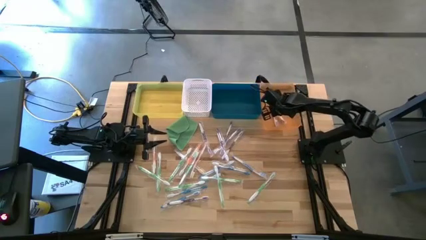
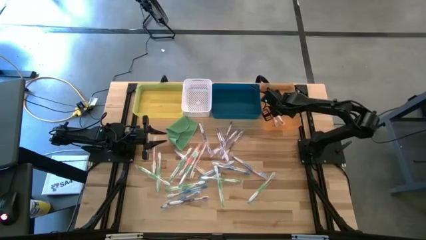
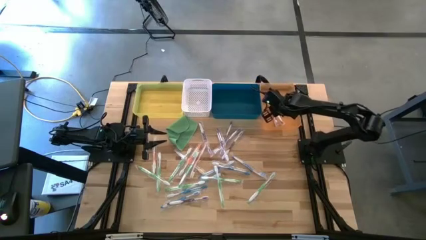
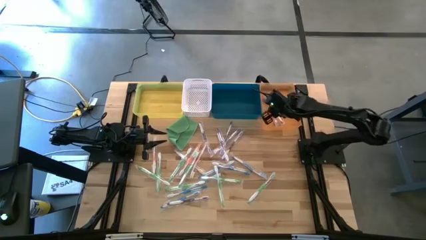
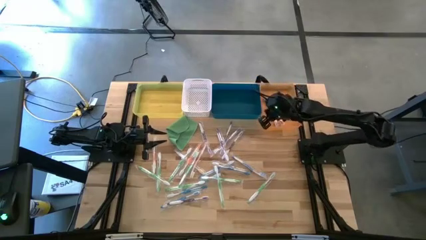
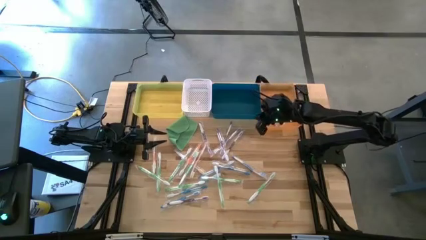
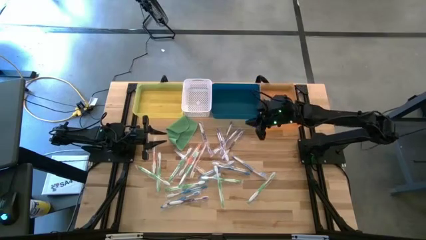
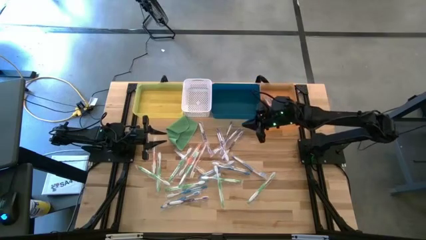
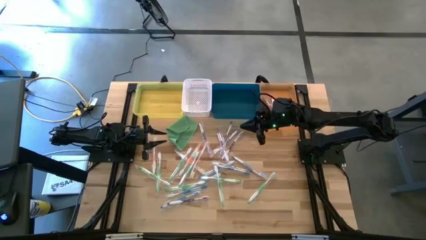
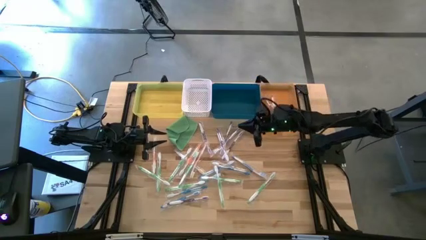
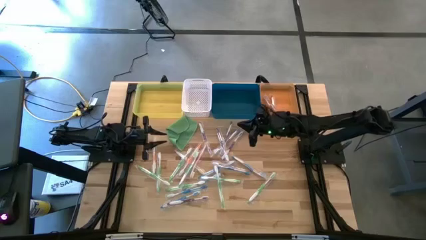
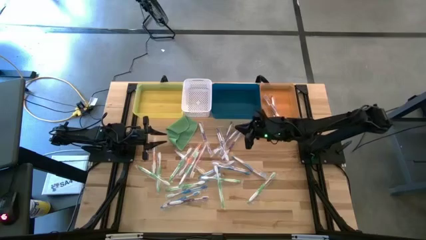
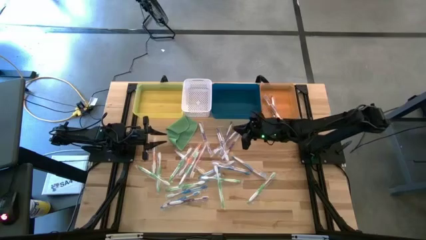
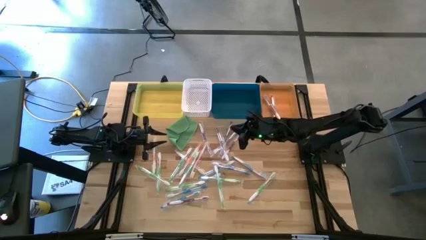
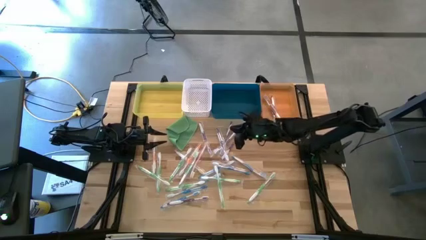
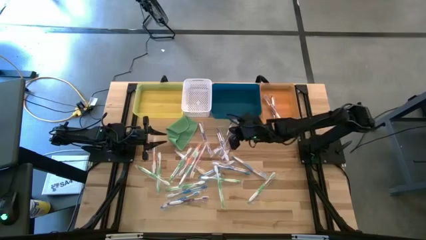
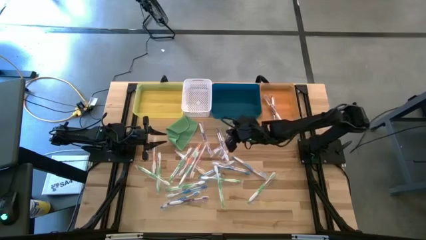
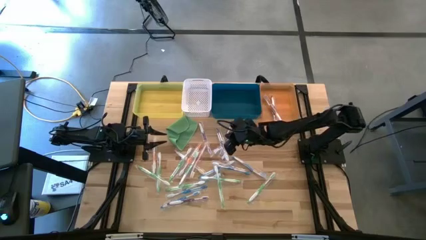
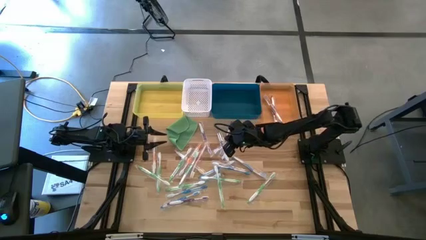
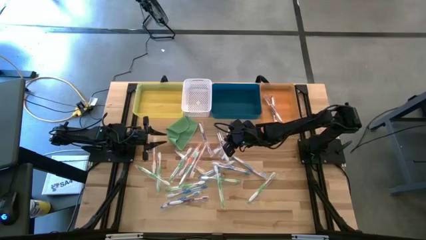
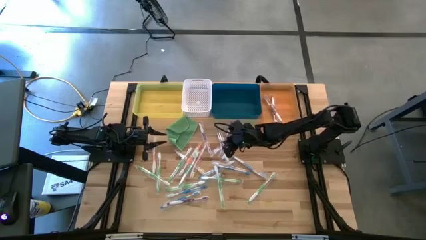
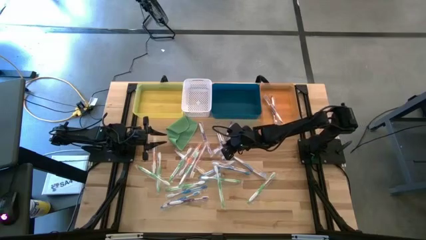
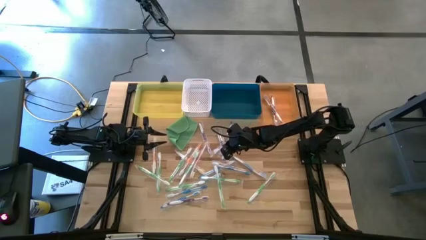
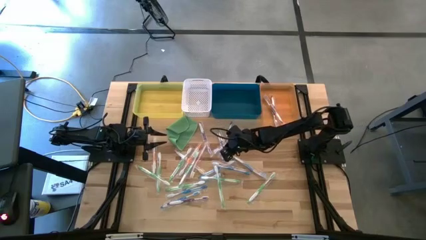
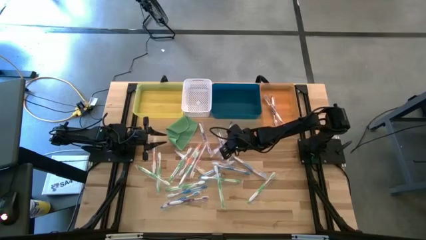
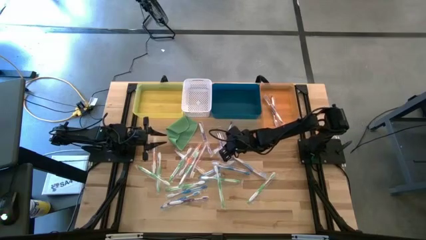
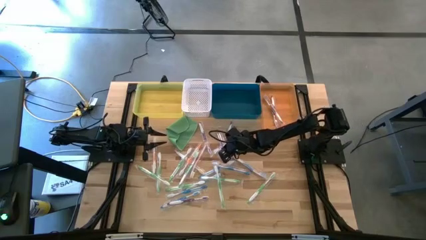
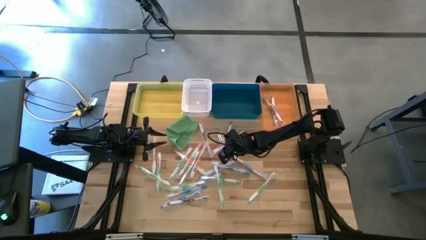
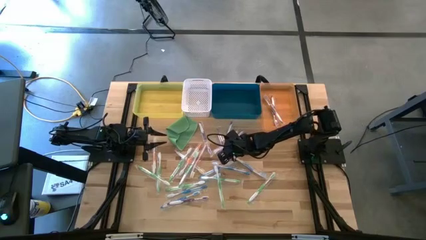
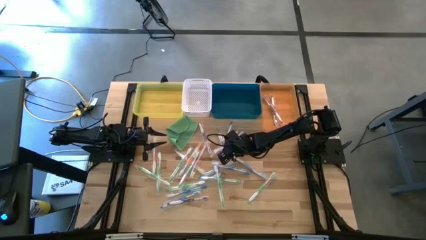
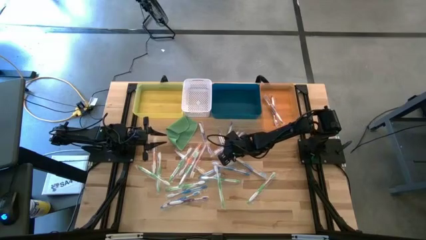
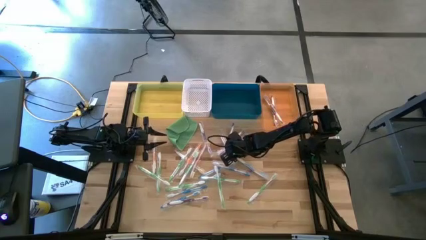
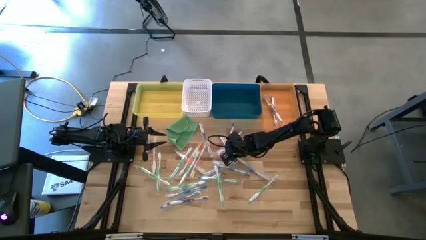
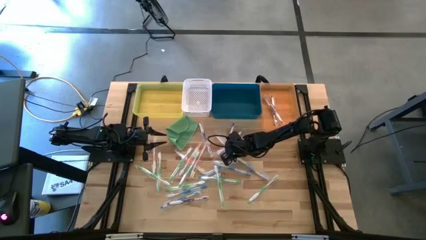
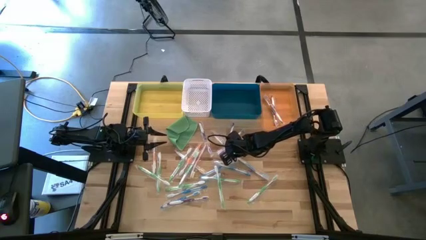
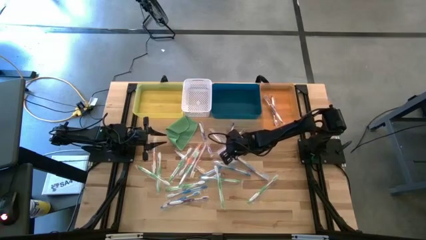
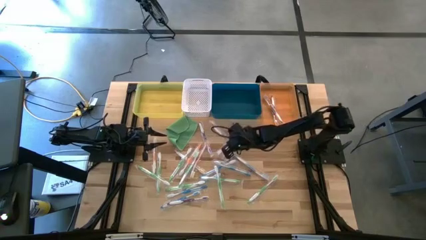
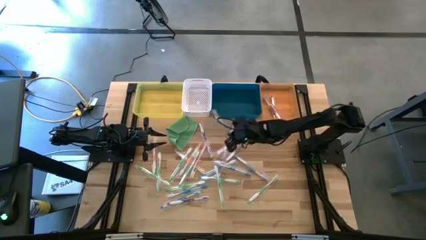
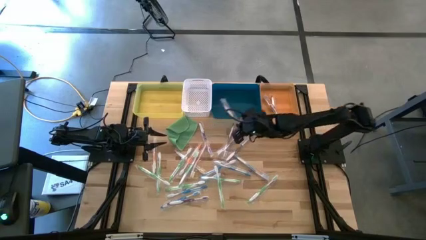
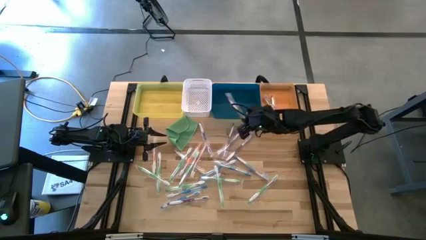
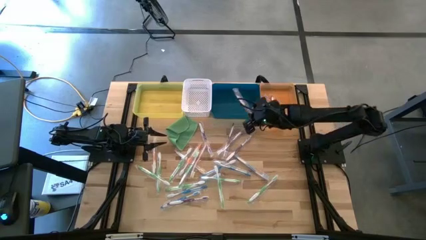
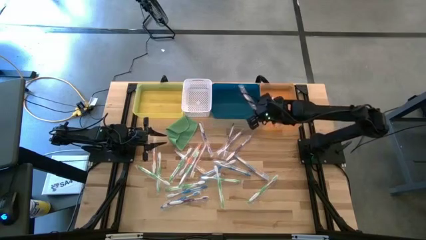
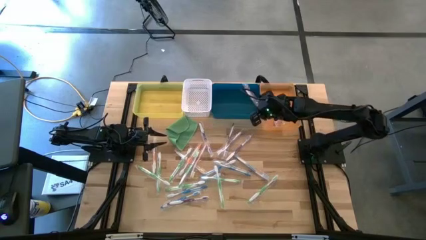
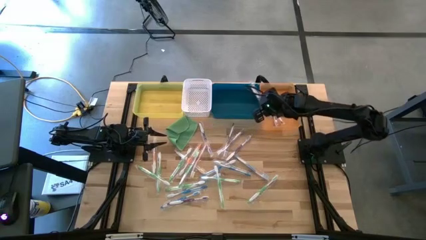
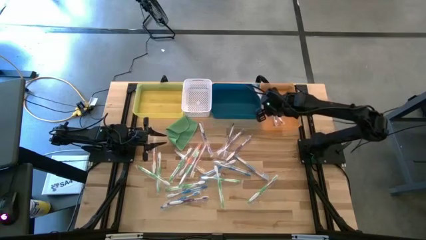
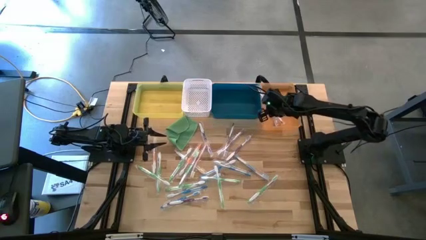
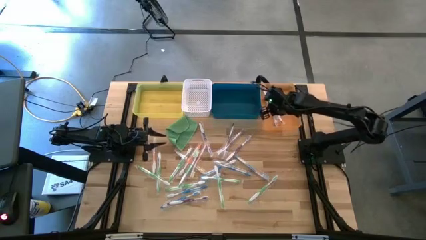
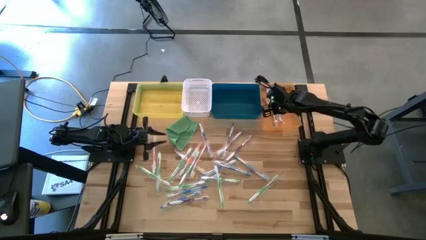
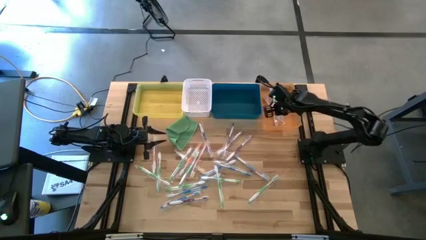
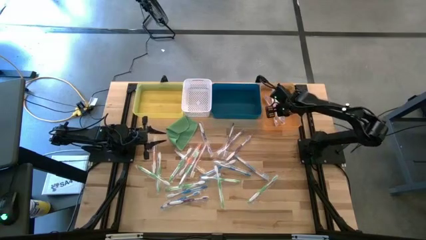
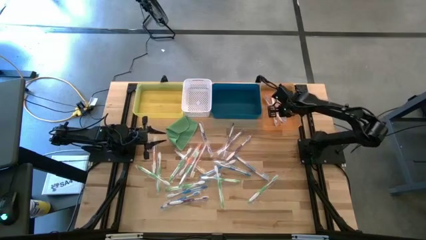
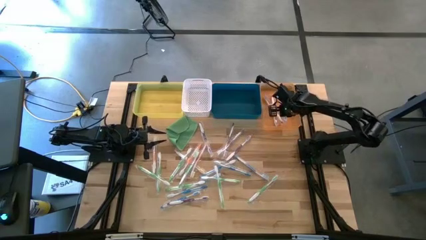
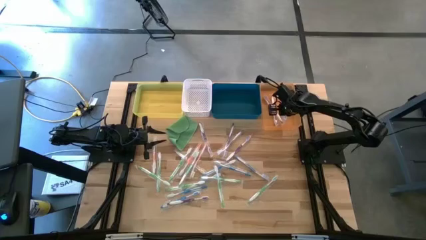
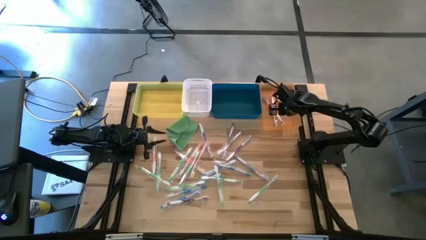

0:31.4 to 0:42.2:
Task: Pick & Place Toothbrushes
Put the violet toothbrush into the orange bin
